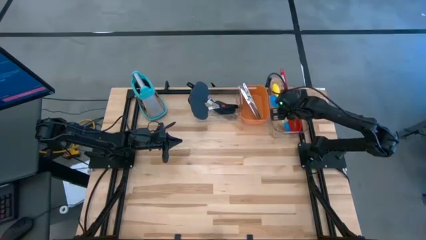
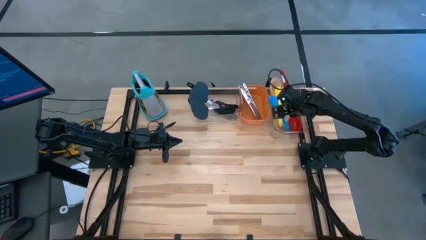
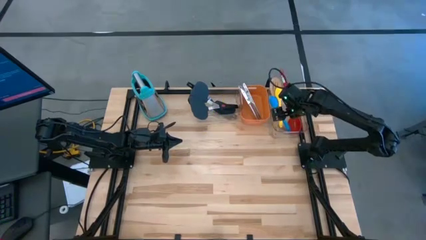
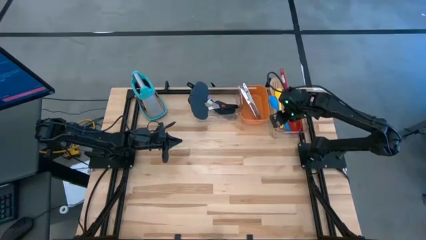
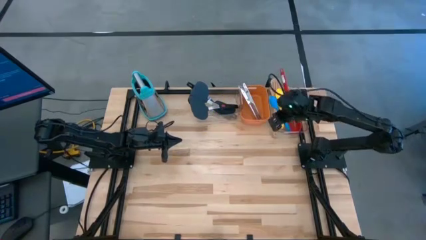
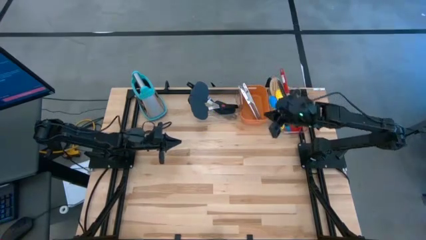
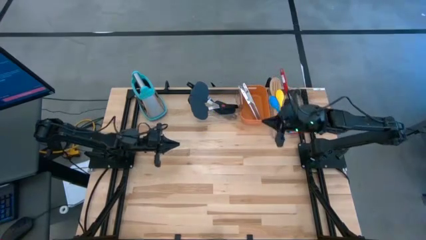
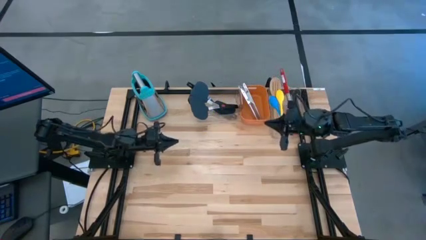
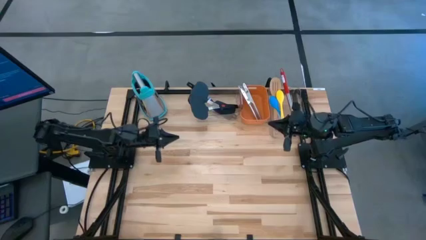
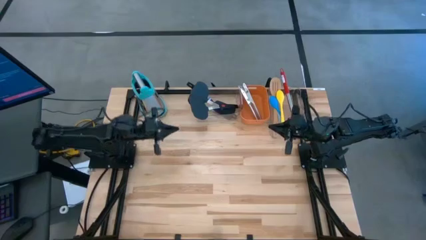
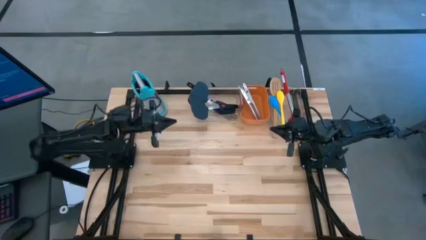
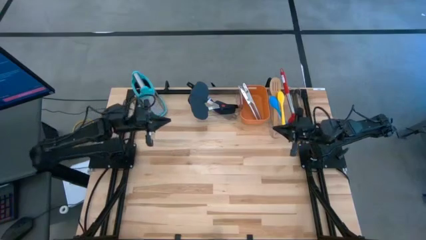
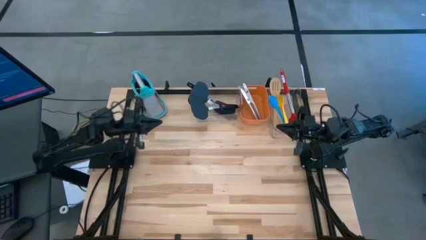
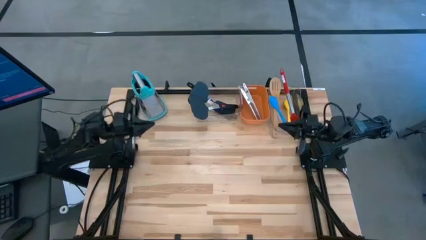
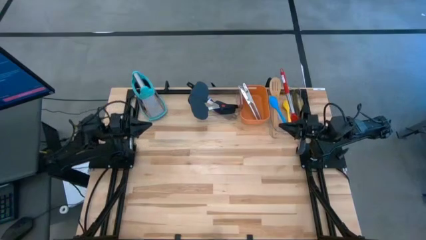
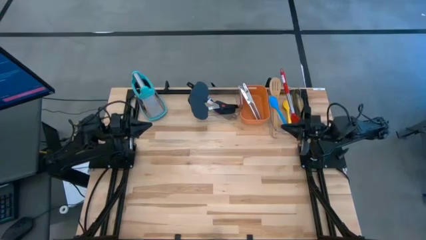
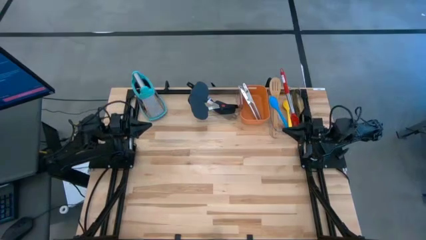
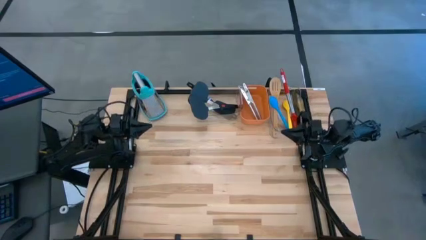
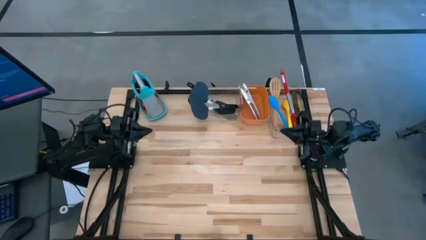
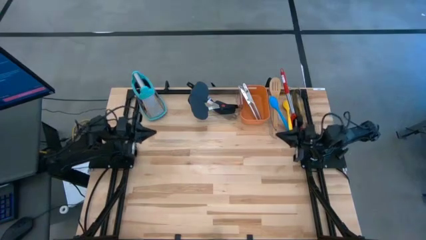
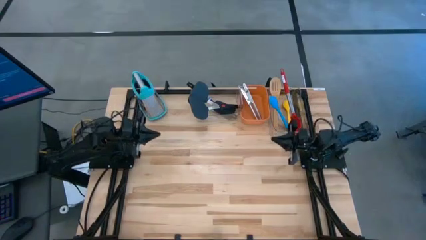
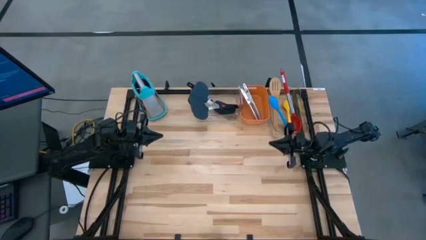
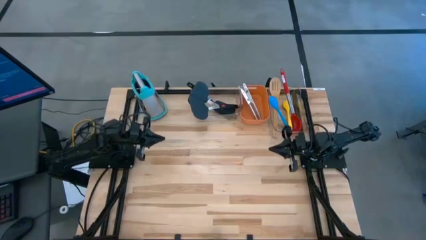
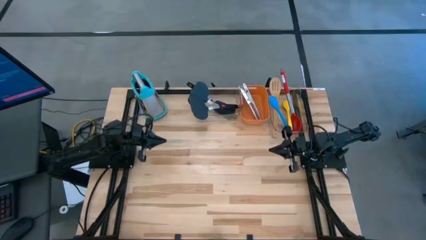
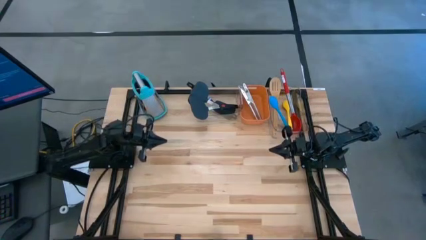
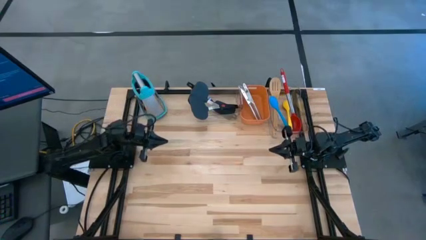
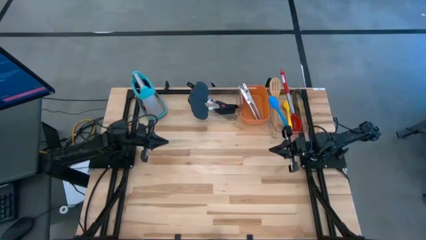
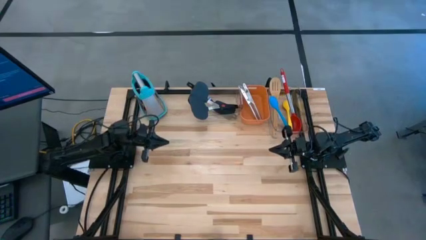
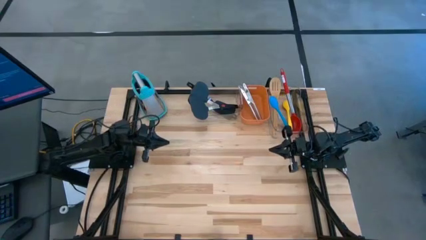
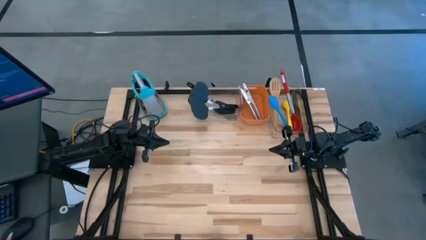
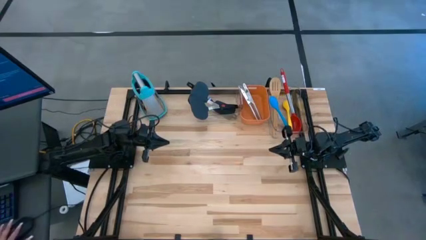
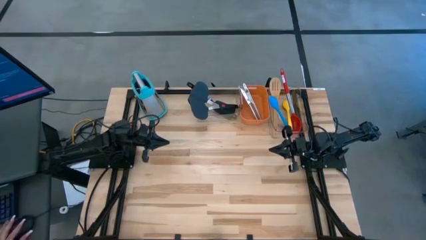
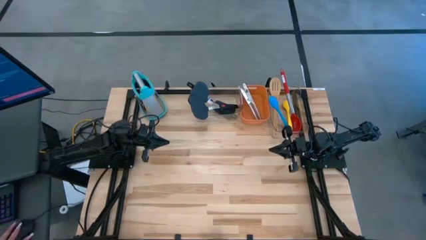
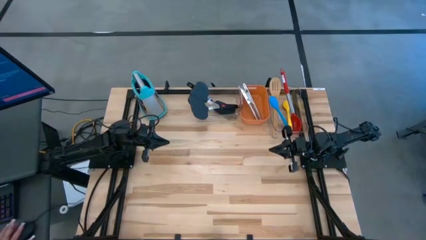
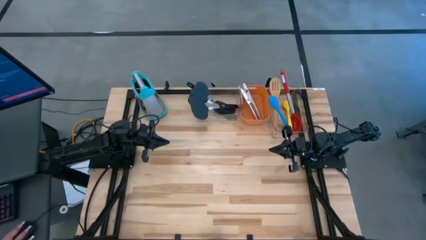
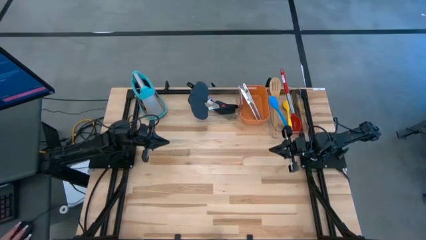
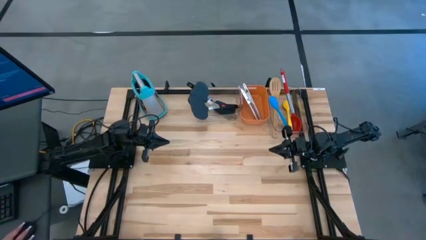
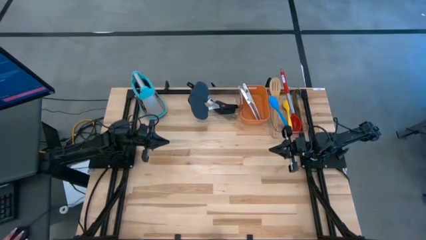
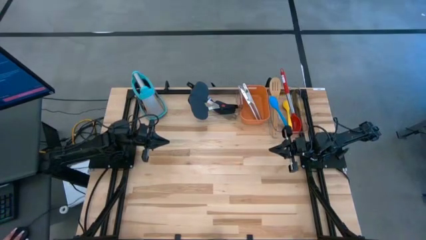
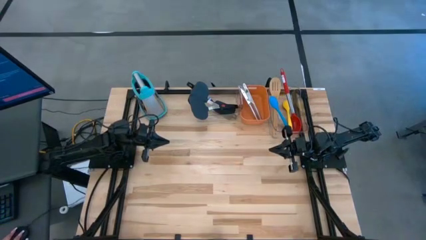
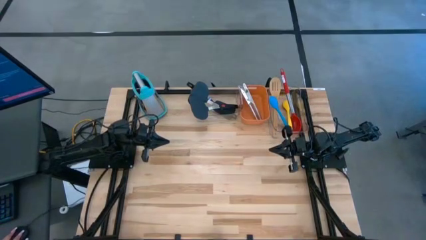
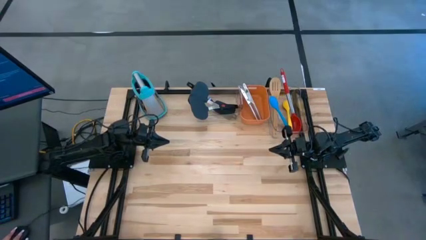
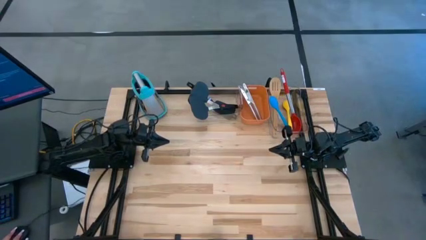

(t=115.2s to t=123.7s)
Task: Pick & Place Kitchen Items
Return to Home Position

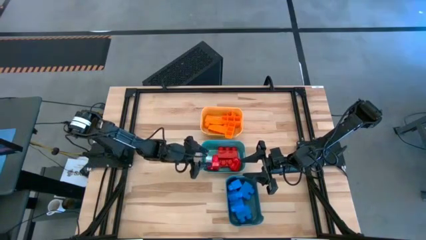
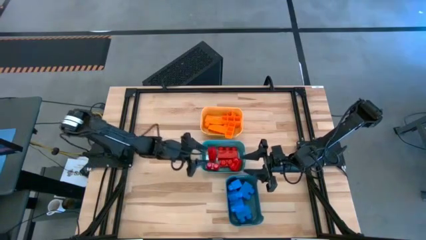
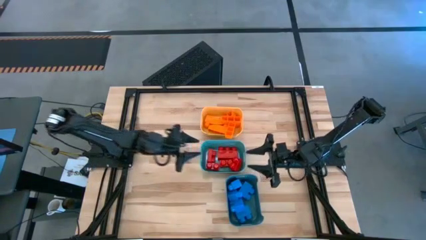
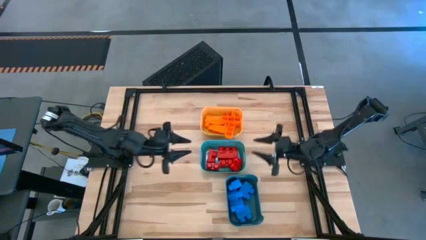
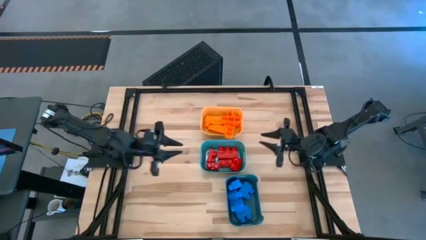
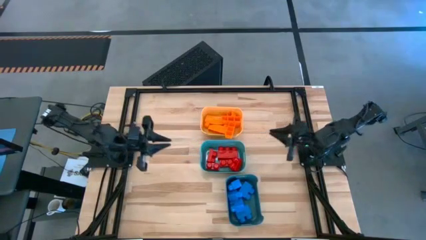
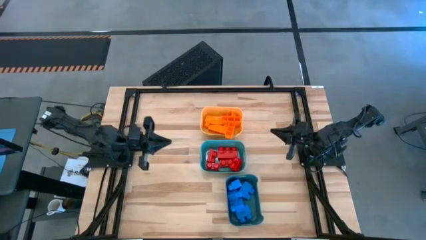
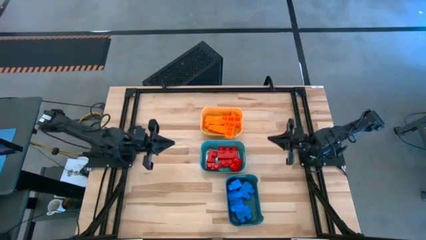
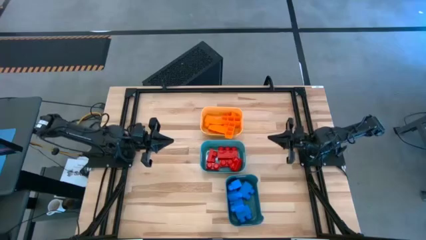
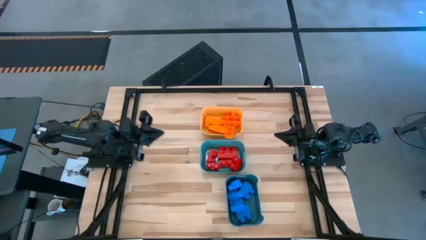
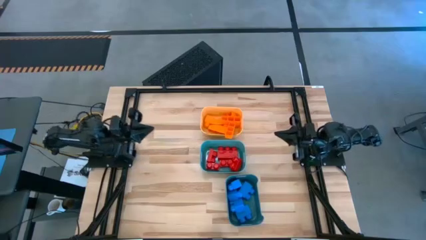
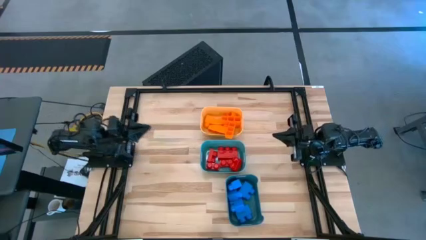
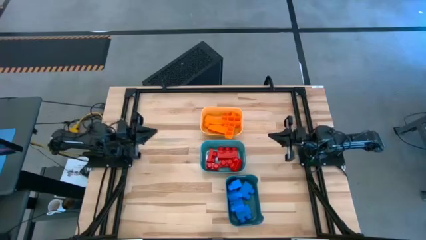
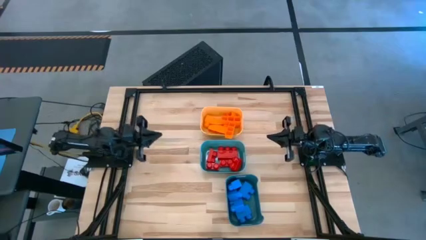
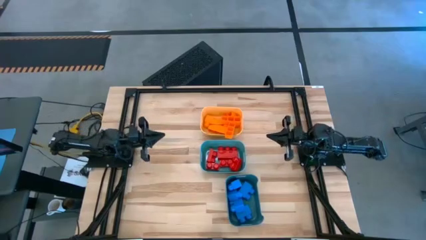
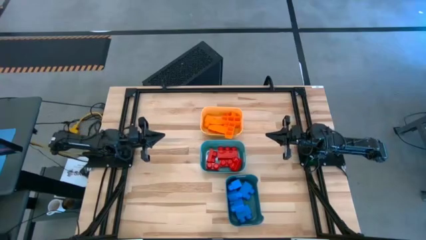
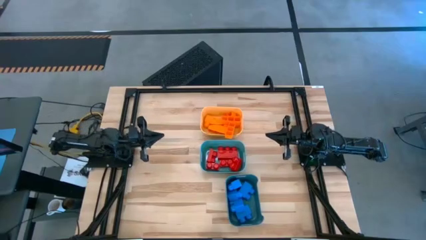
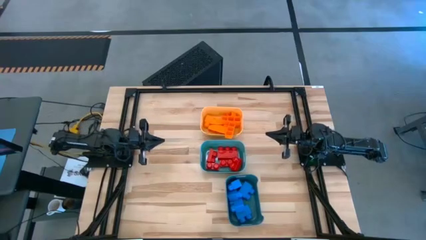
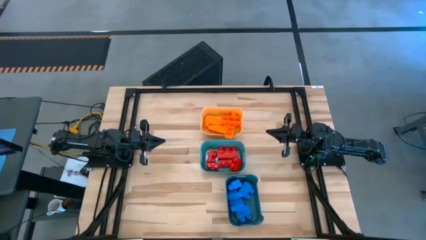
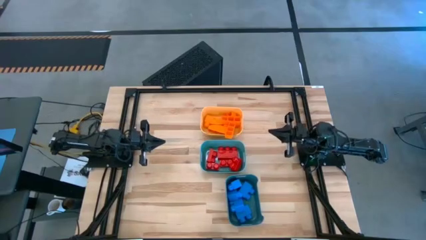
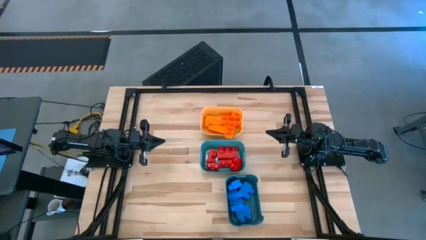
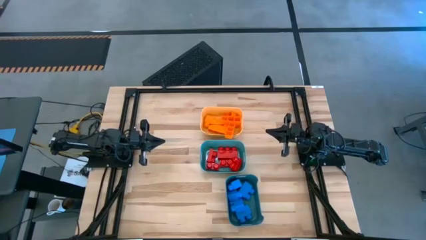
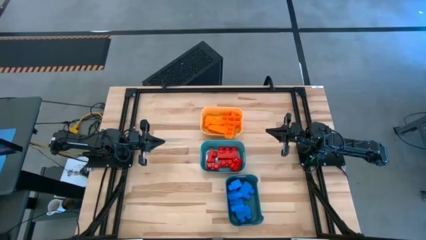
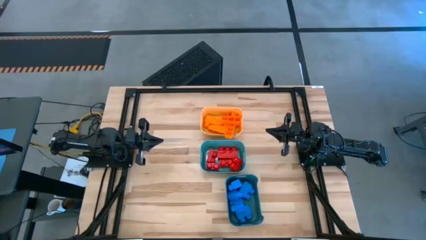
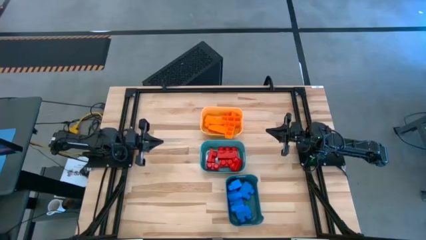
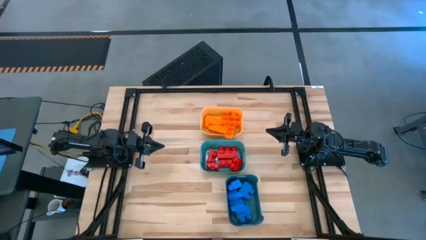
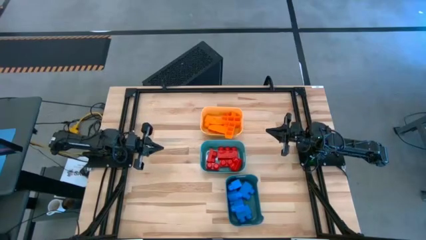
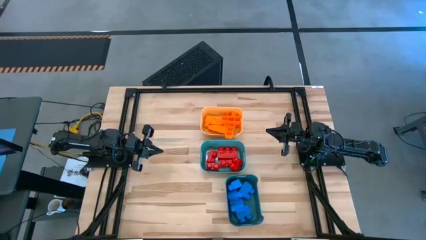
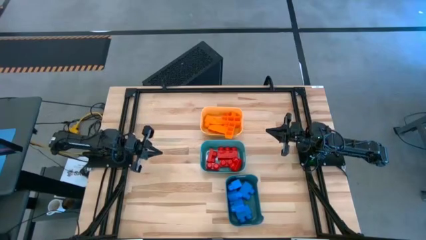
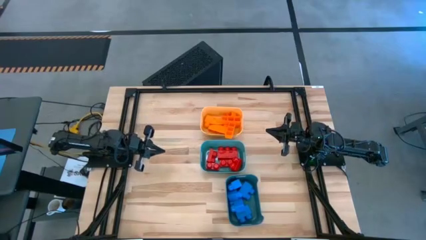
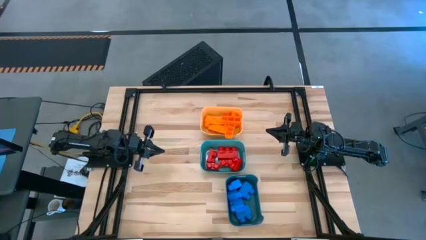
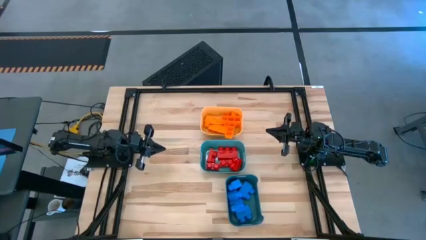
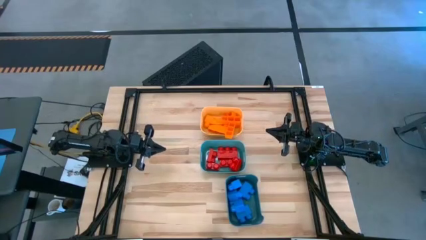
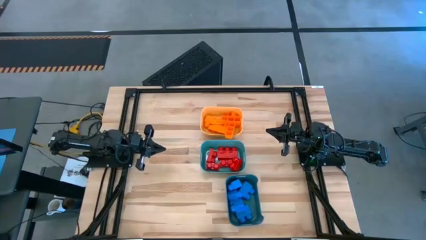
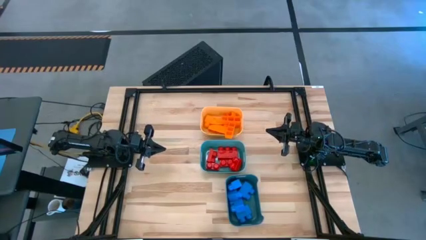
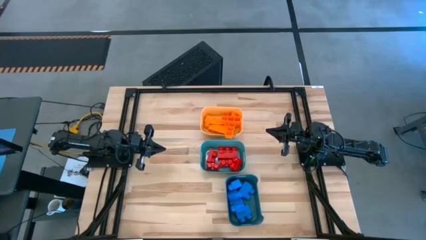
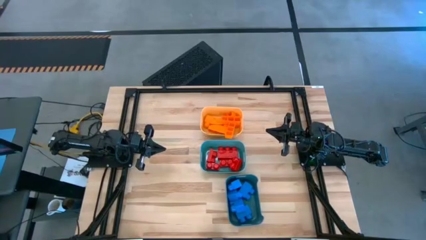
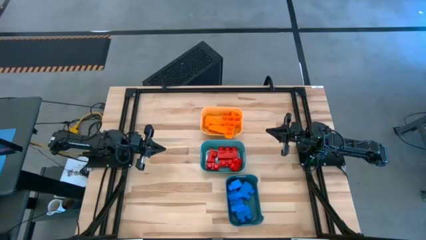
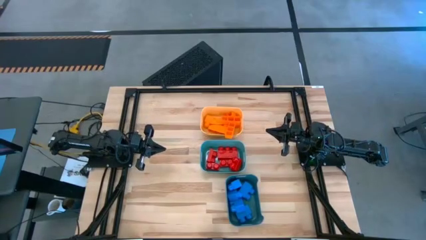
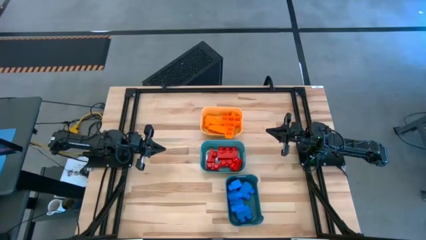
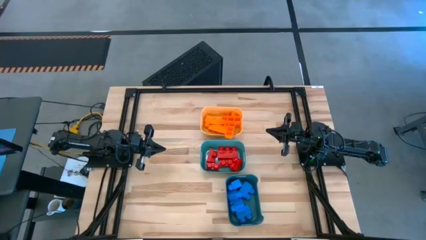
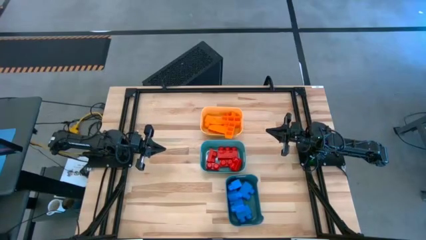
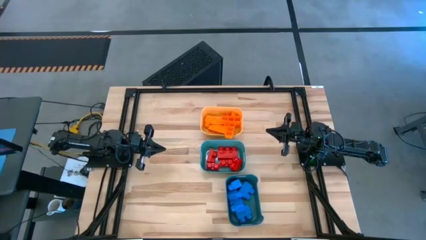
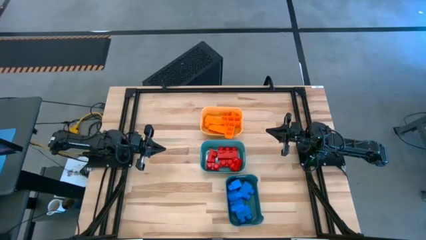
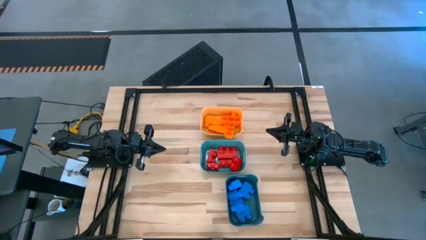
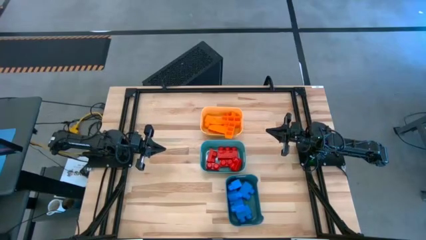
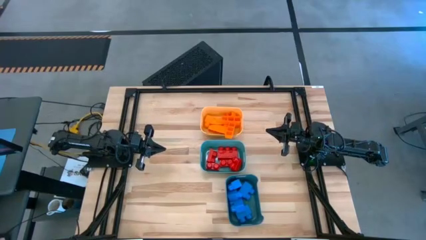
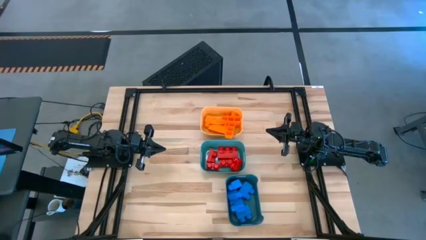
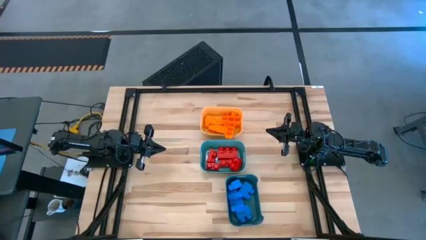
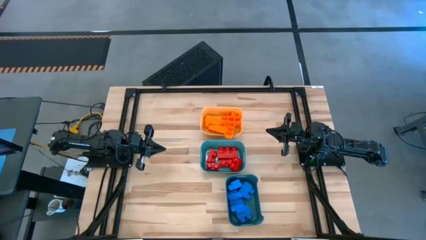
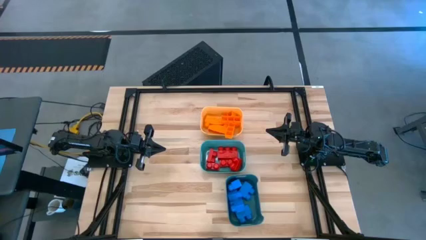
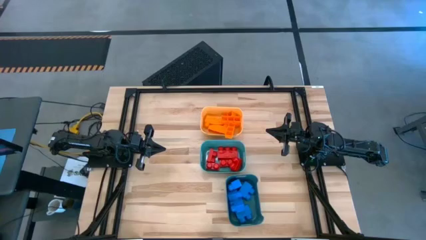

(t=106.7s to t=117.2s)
Task: Sort & place blocks by color
Return to Home Position
